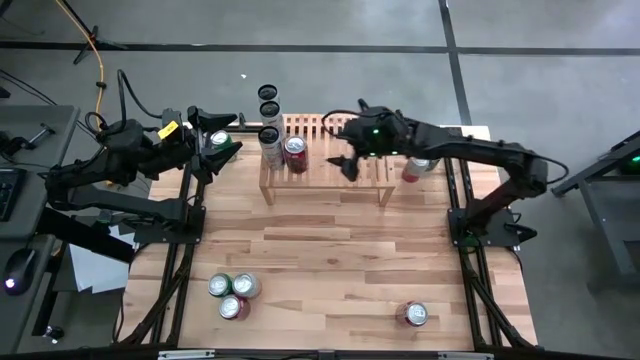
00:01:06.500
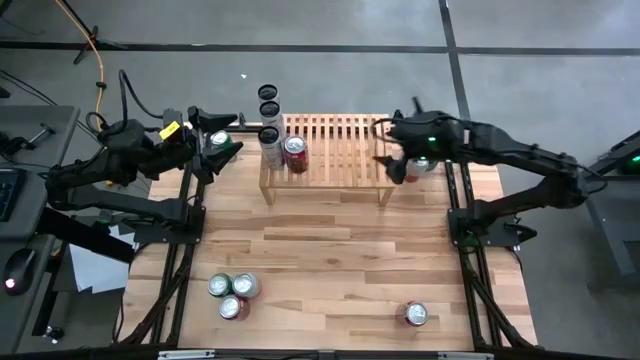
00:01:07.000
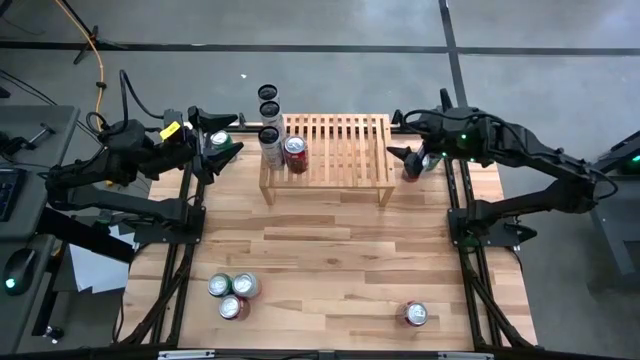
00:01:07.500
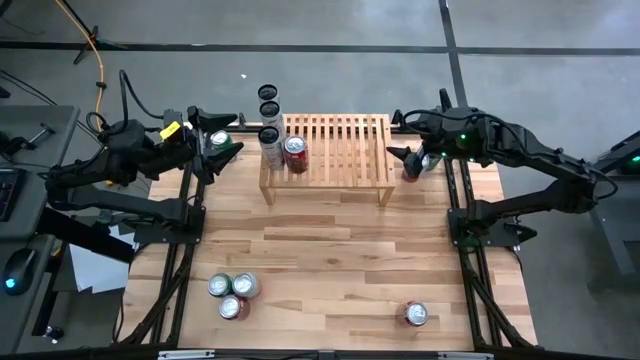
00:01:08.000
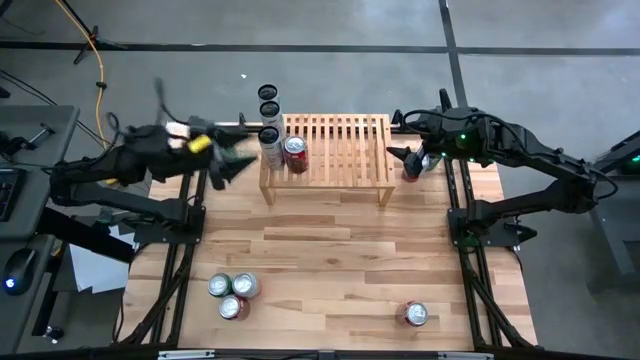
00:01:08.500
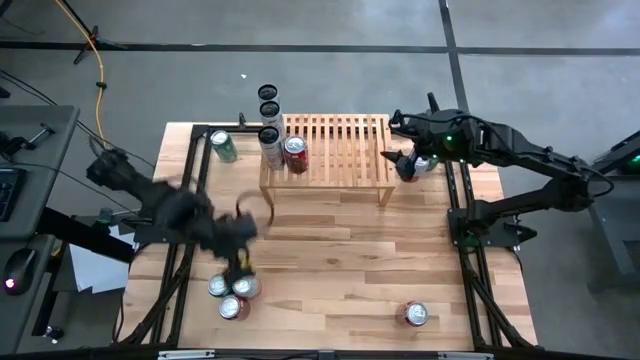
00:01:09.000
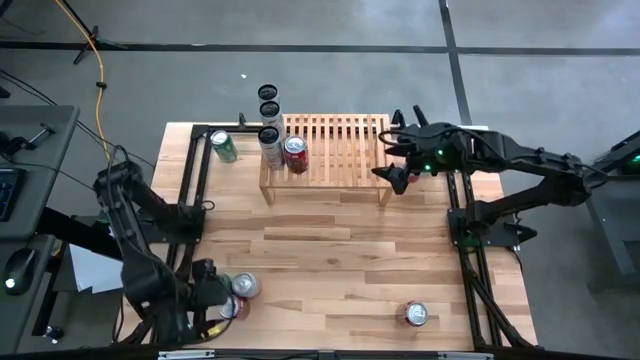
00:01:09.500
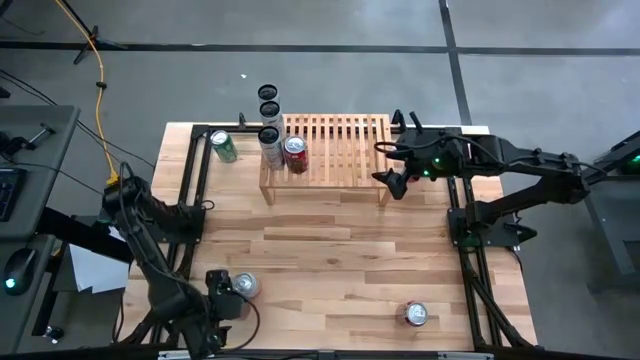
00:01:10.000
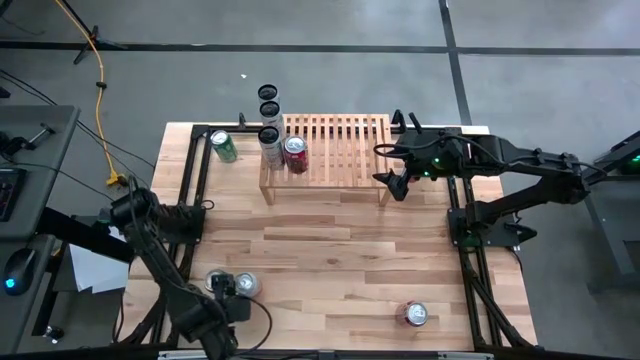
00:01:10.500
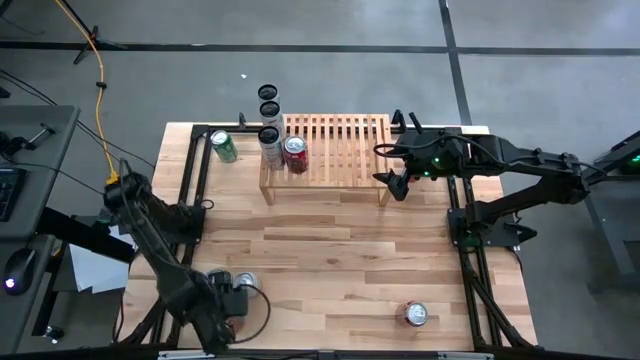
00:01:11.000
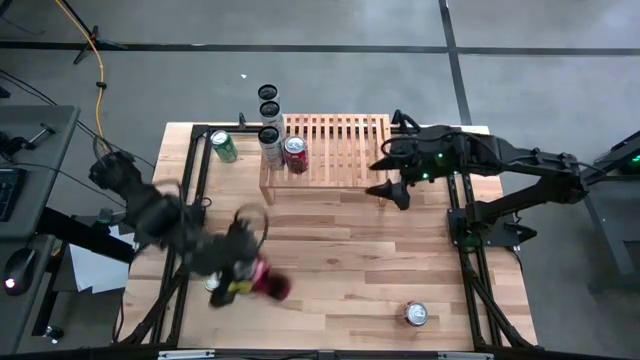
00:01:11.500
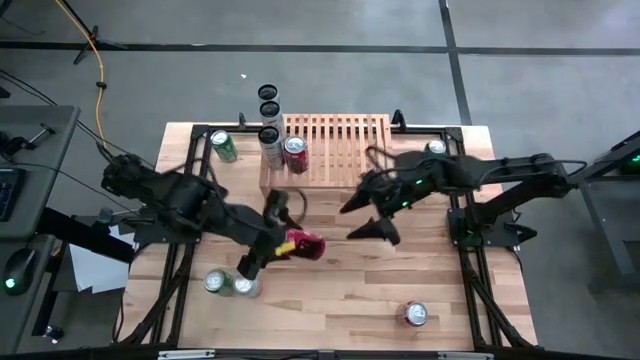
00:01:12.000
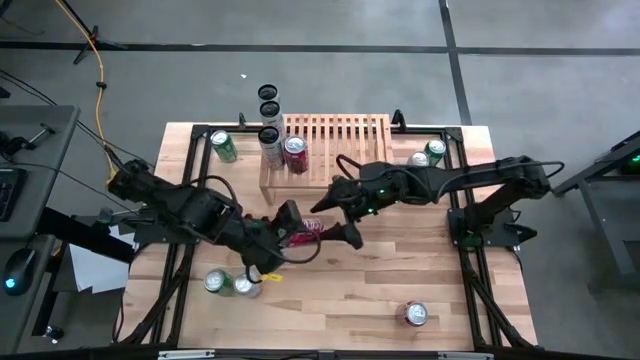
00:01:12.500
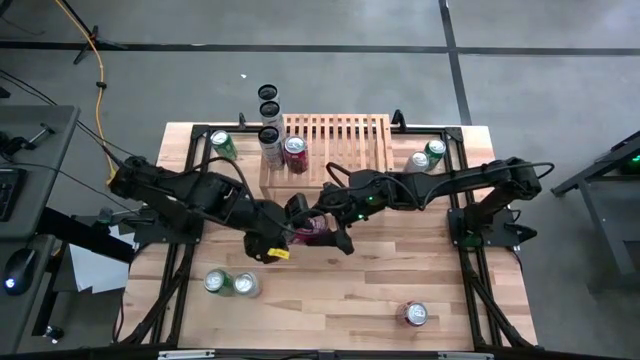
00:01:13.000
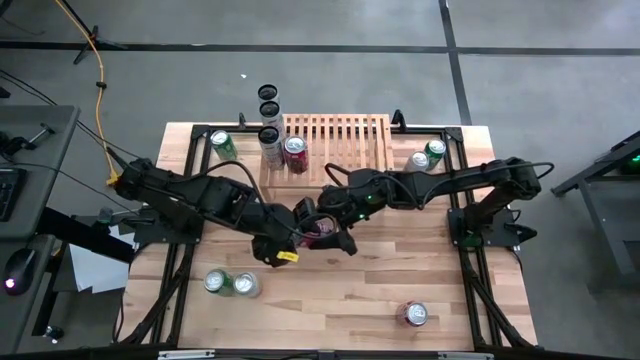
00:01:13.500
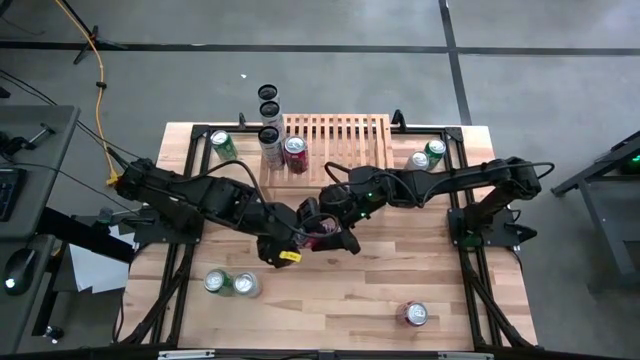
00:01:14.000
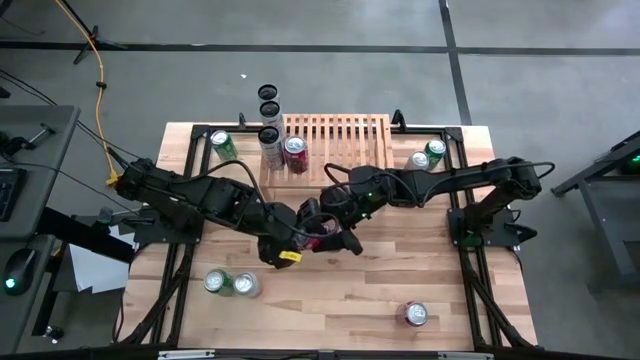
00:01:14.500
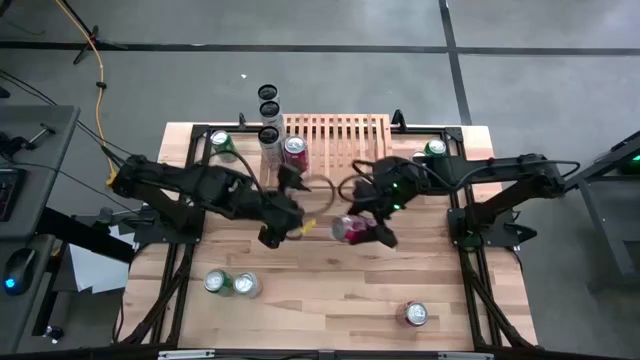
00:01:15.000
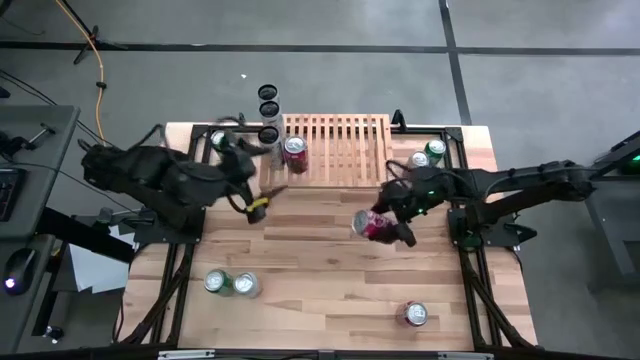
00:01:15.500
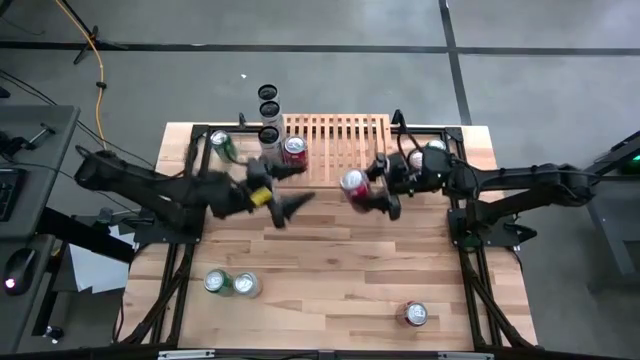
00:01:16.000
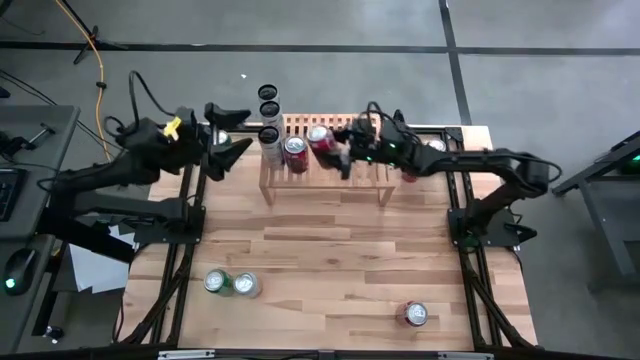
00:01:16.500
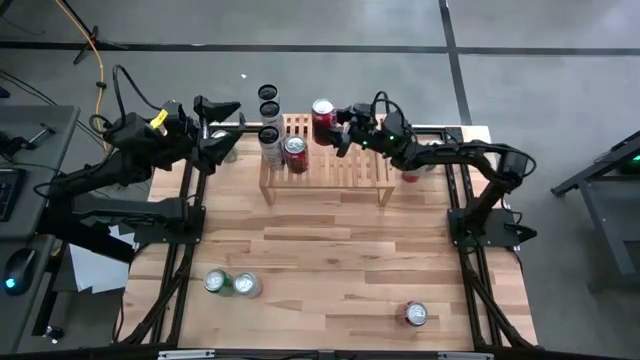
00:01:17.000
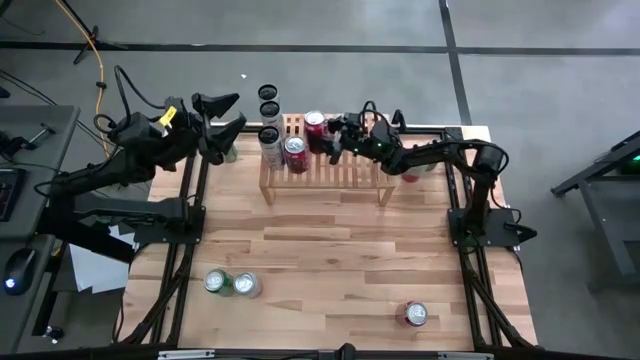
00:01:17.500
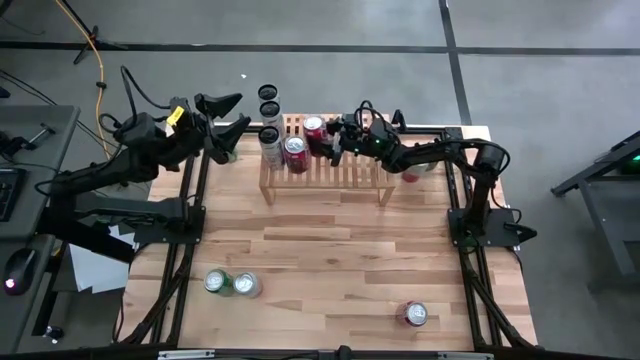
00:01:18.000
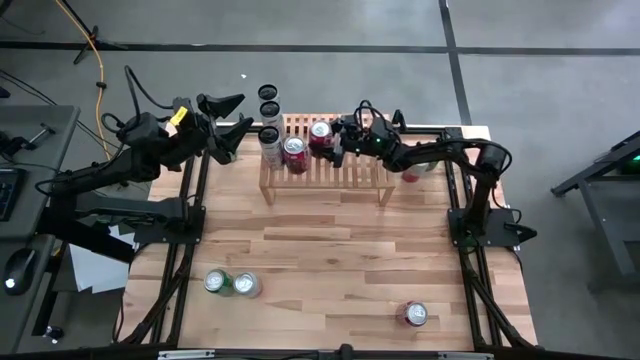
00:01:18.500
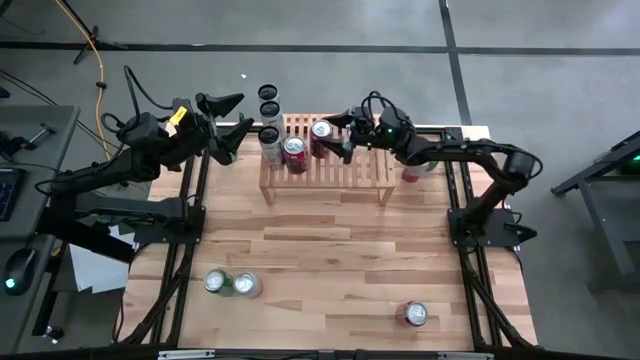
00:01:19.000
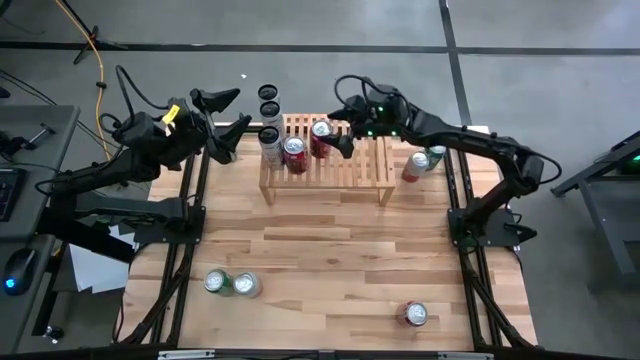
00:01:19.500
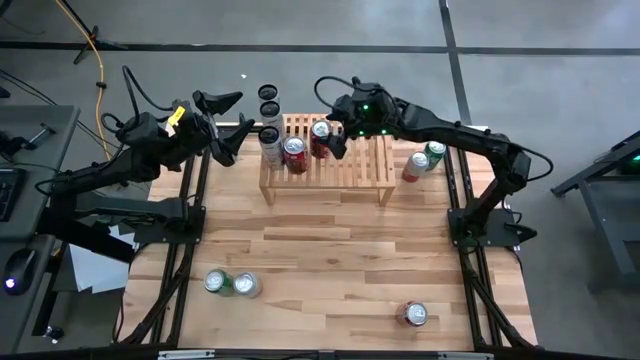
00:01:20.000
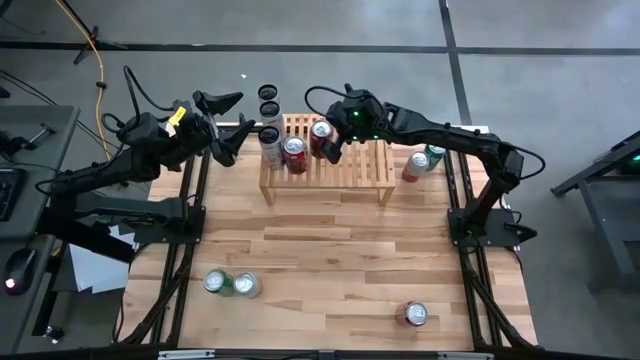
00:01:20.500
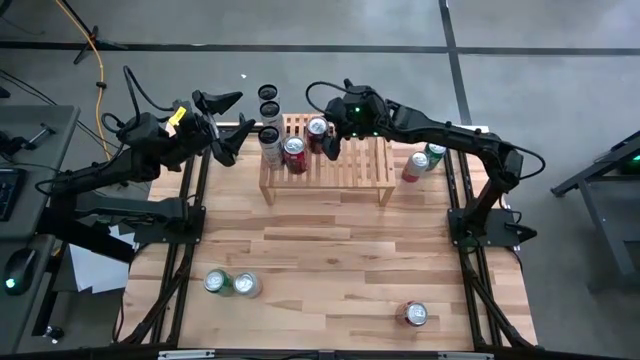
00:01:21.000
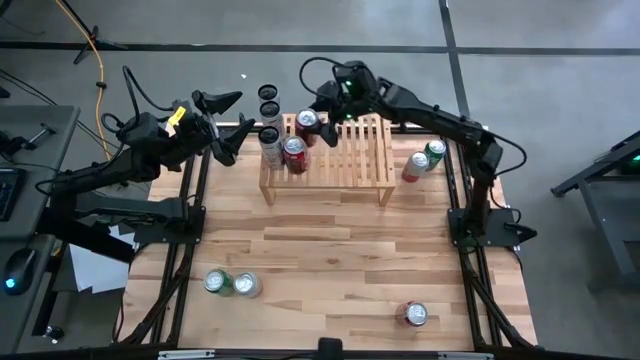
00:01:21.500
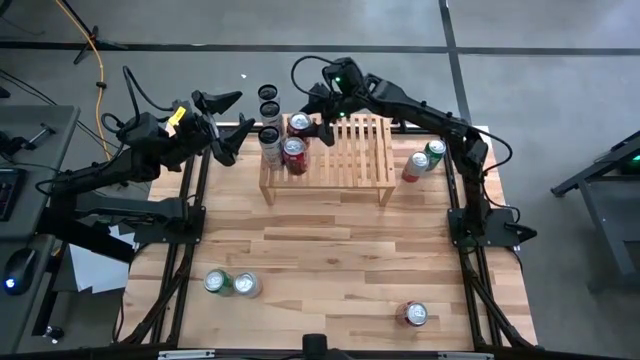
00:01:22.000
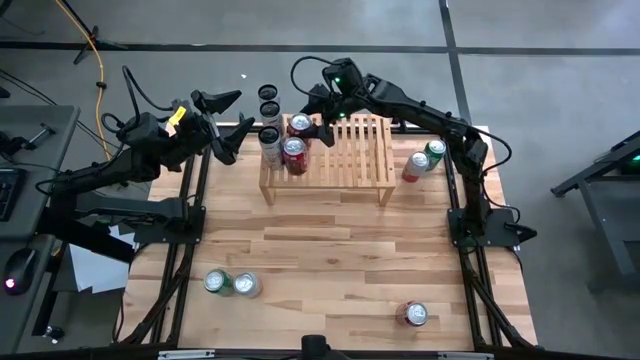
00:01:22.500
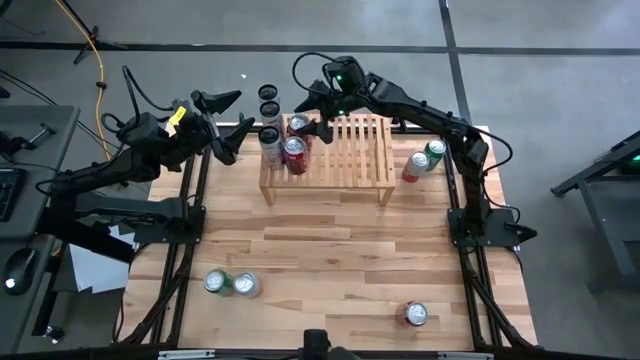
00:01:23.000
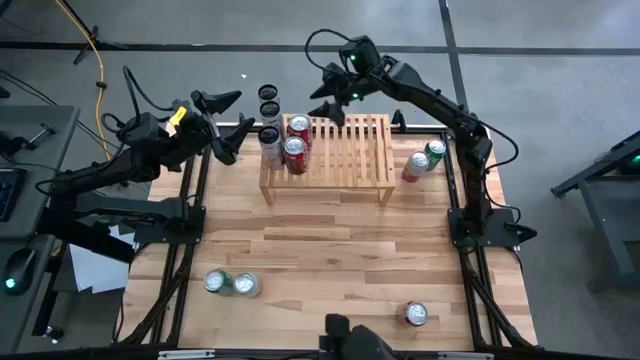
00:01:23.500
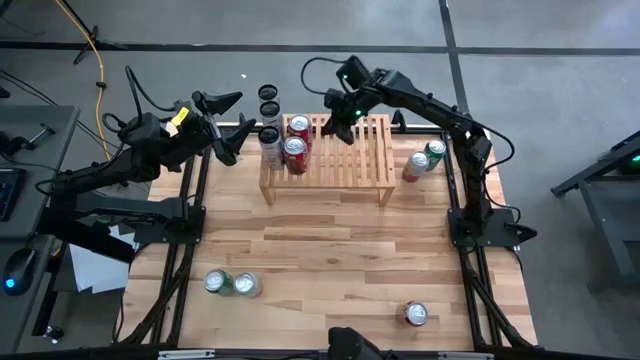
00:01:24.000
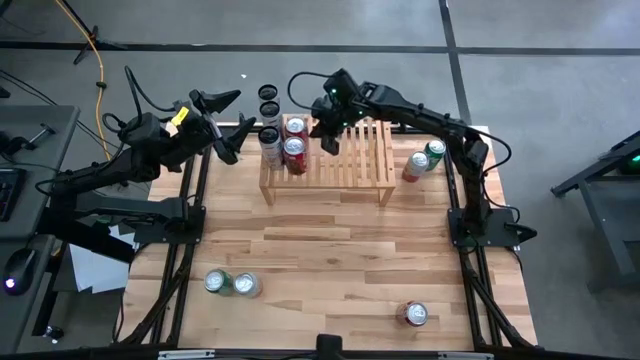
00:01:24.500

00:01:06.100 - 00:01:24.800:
Task: Place canned beverage on shelf
Put the left red-white soda can on the shelf aligned with the other red-white soda can

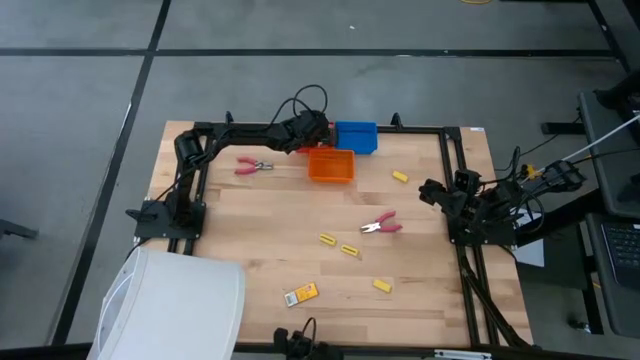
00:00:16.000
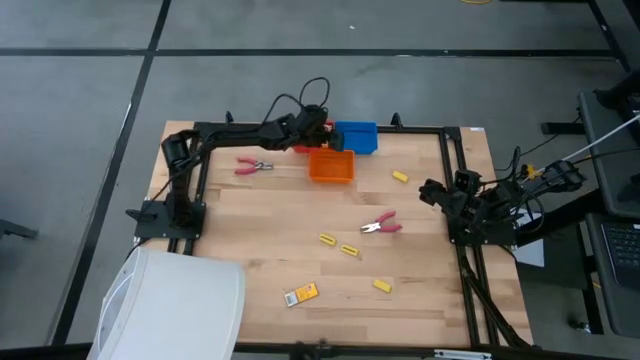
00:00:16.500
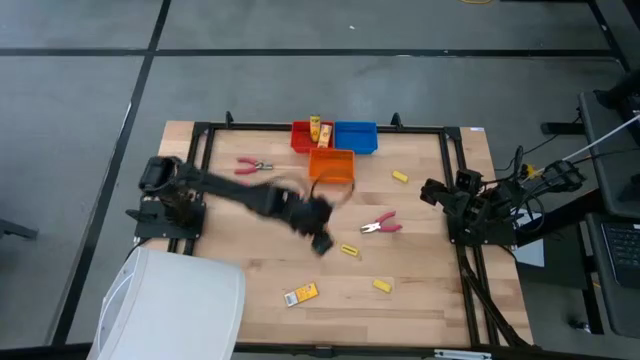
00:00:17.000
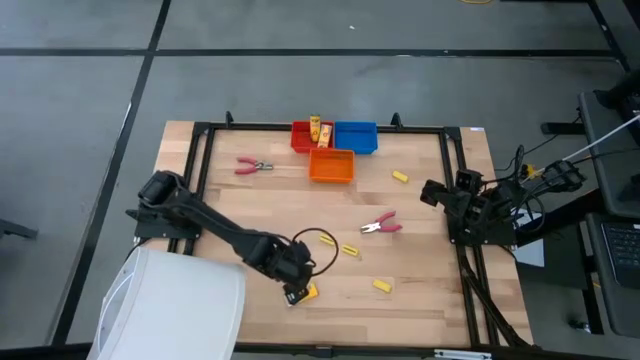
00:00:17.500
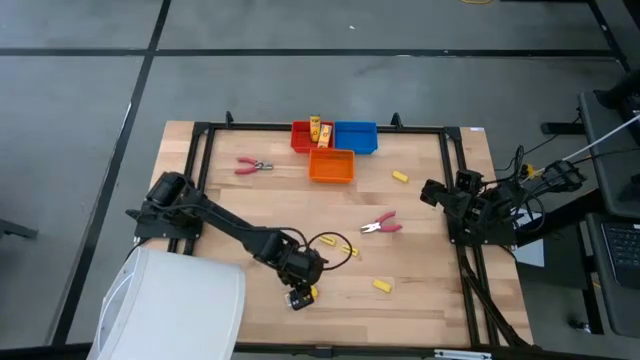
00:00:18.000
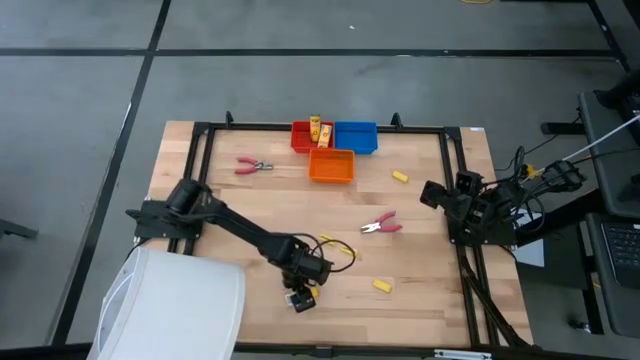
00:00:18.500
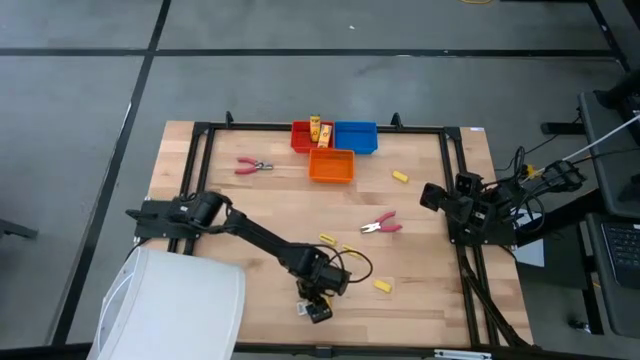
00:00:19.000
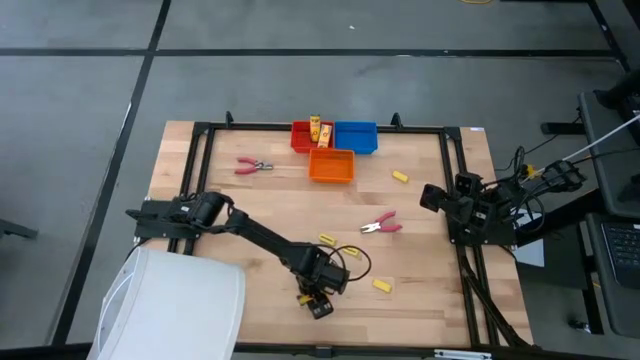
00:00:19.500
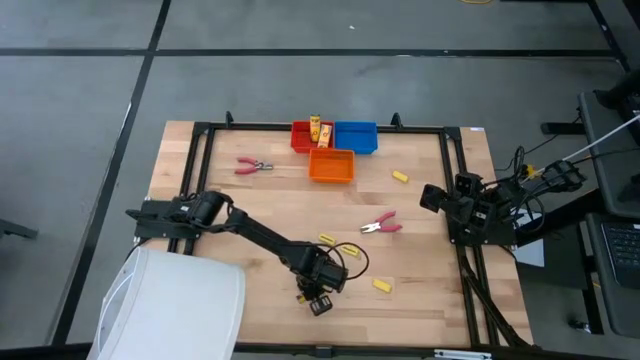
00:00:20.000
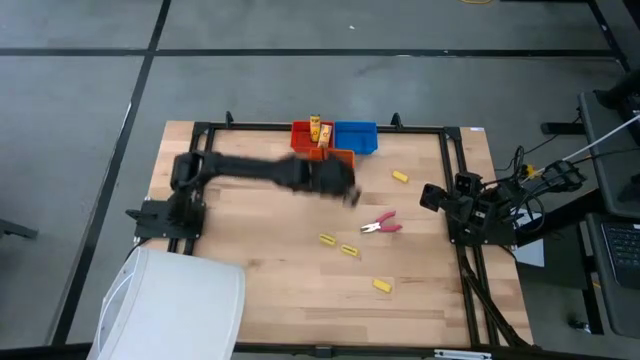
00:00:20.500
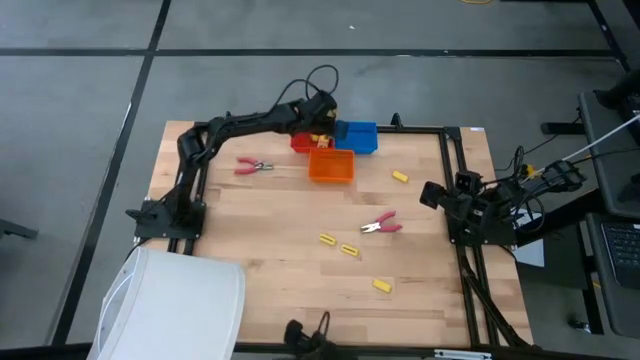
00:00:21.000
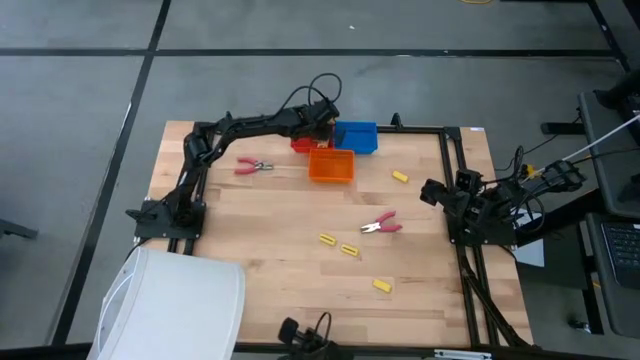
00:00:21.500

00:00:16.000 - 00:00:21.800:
Task: Pick & Place School Supplies
Put the yellow crayon box into the red bin
